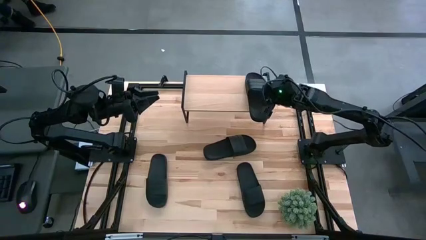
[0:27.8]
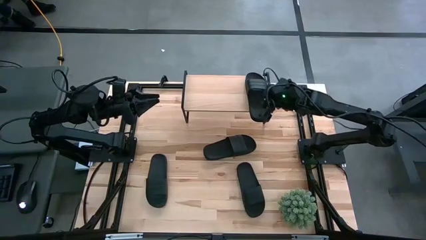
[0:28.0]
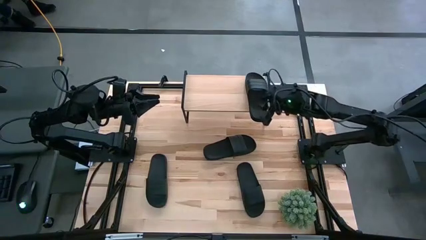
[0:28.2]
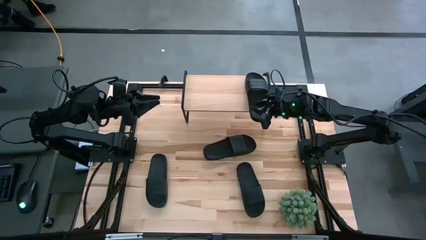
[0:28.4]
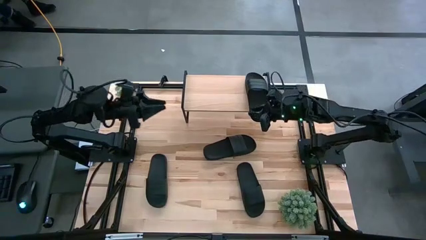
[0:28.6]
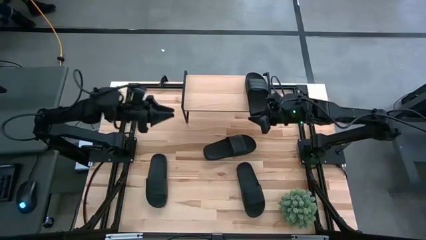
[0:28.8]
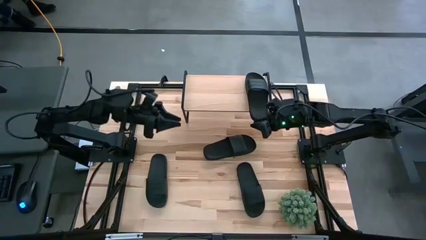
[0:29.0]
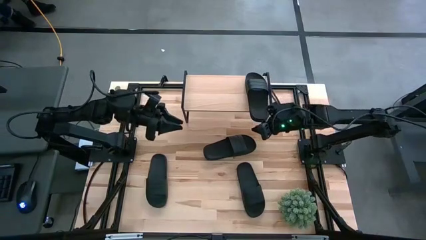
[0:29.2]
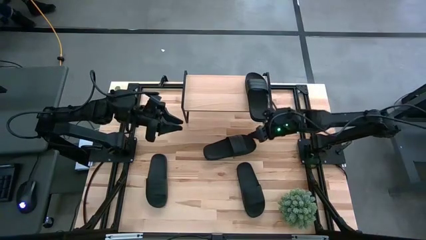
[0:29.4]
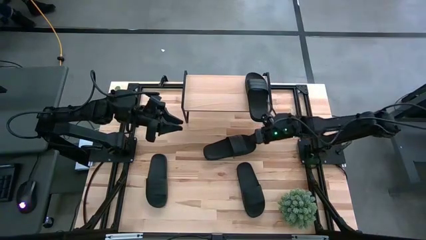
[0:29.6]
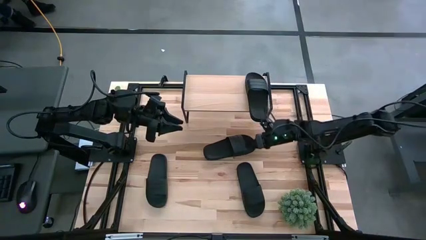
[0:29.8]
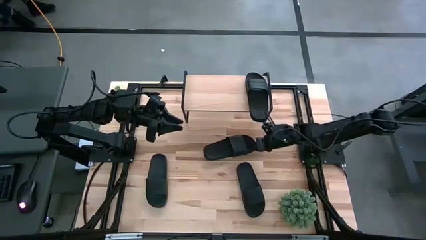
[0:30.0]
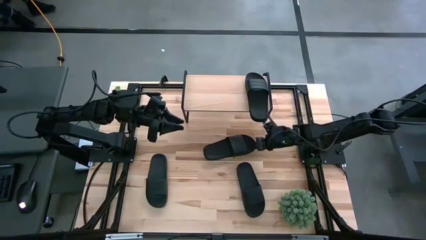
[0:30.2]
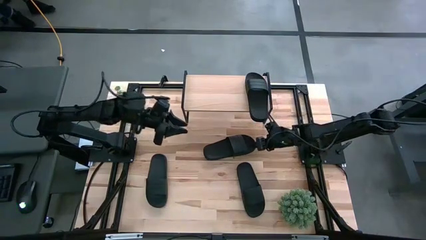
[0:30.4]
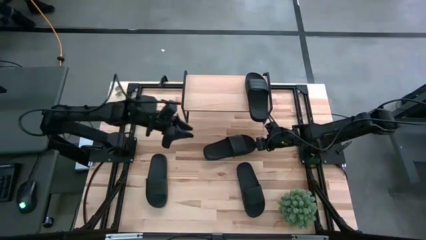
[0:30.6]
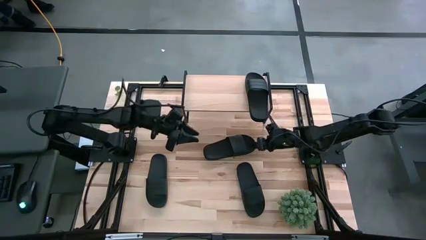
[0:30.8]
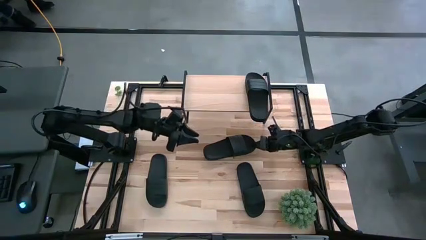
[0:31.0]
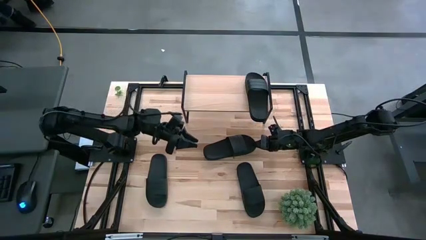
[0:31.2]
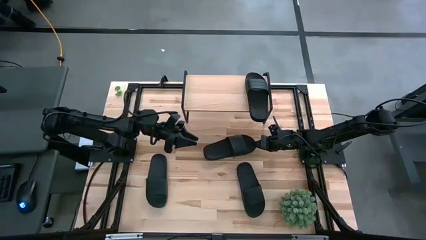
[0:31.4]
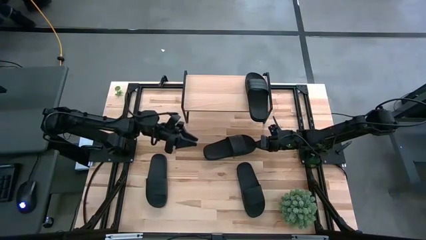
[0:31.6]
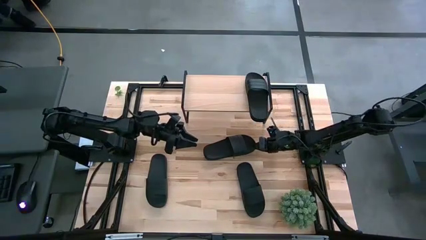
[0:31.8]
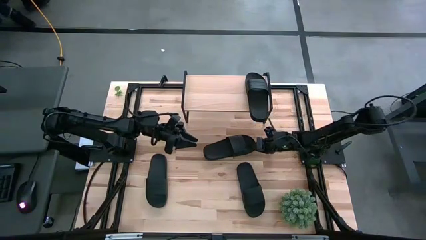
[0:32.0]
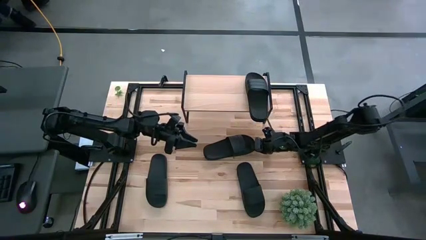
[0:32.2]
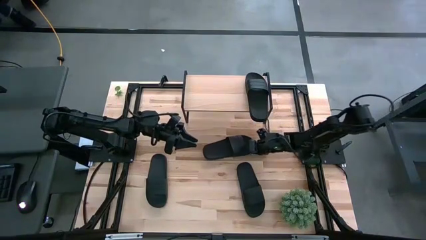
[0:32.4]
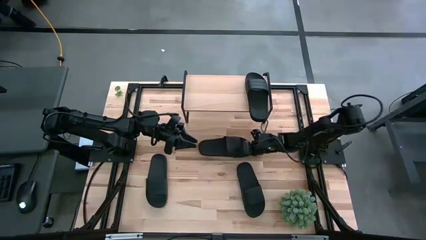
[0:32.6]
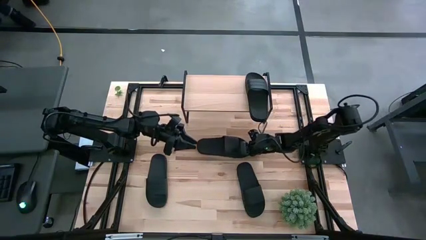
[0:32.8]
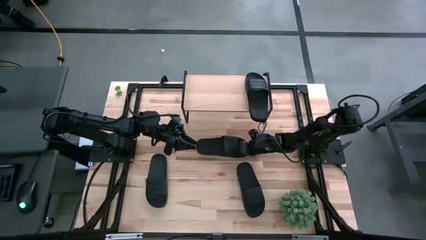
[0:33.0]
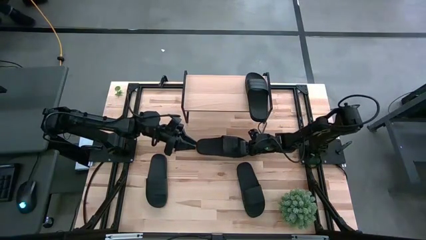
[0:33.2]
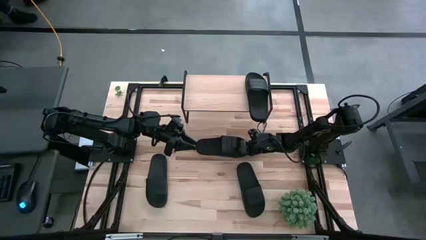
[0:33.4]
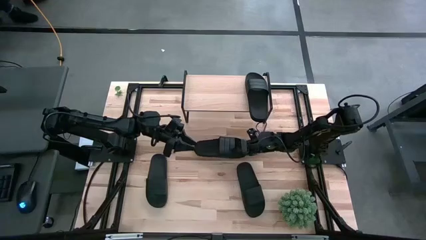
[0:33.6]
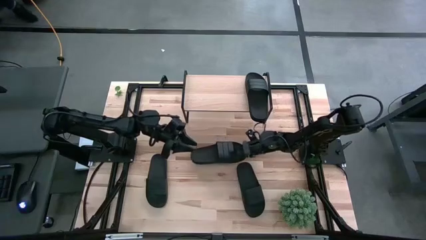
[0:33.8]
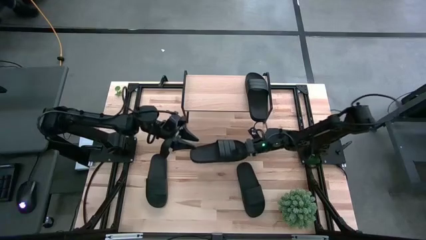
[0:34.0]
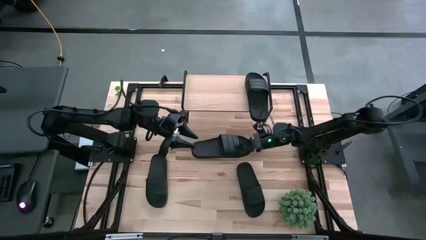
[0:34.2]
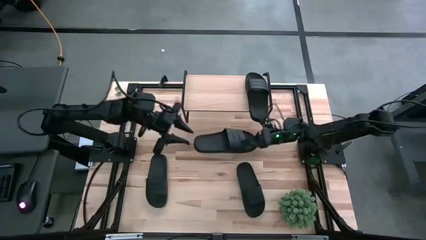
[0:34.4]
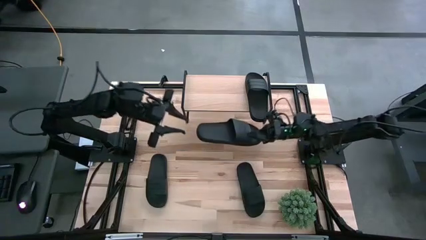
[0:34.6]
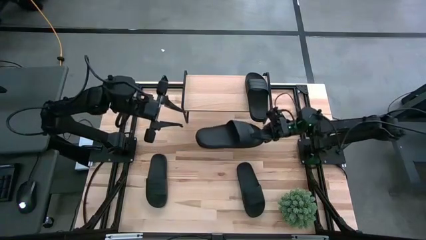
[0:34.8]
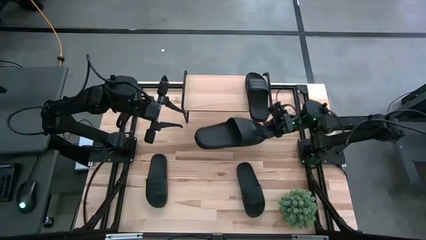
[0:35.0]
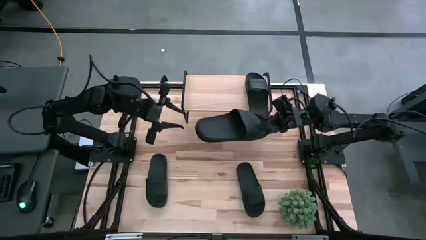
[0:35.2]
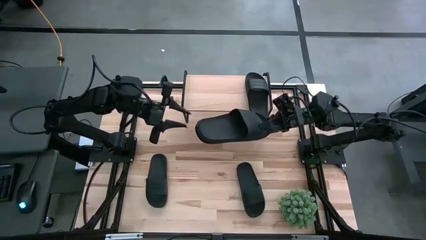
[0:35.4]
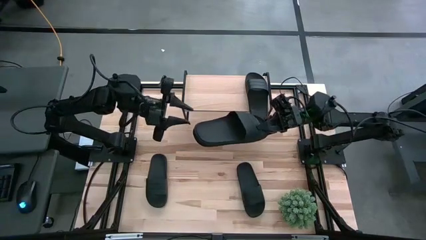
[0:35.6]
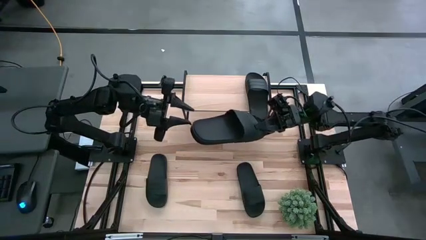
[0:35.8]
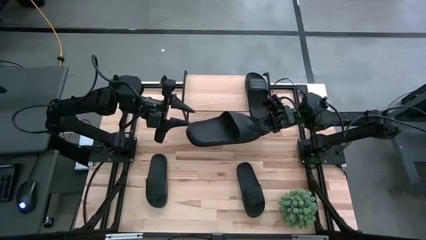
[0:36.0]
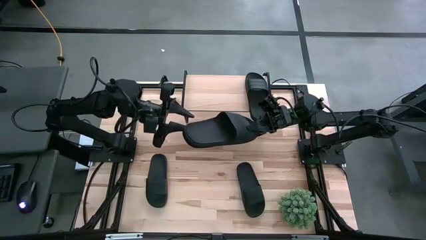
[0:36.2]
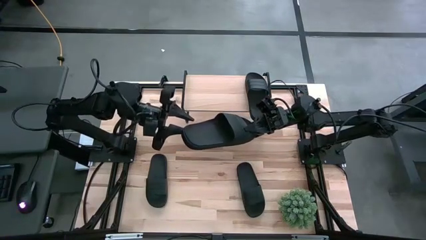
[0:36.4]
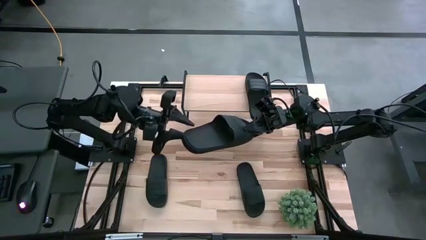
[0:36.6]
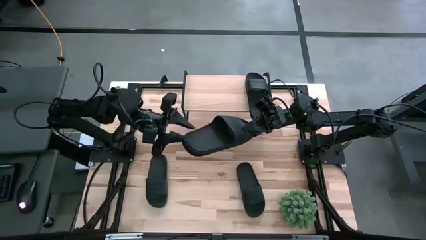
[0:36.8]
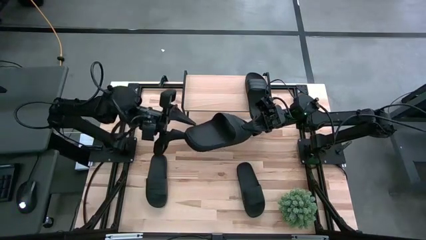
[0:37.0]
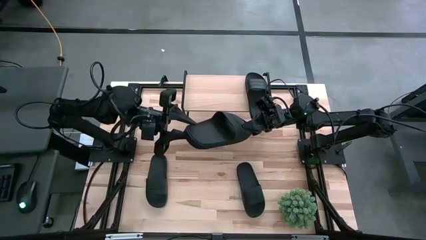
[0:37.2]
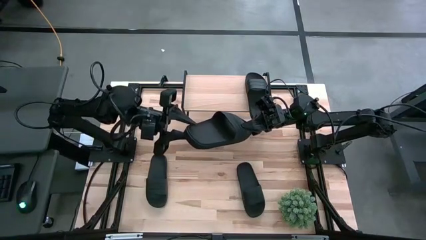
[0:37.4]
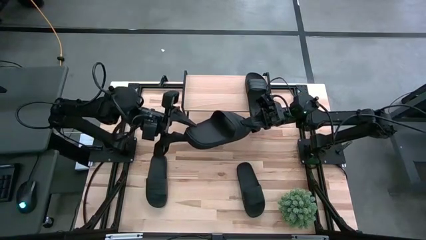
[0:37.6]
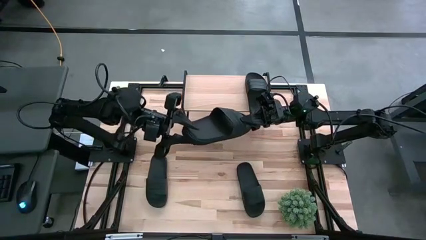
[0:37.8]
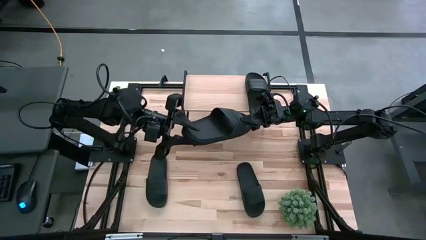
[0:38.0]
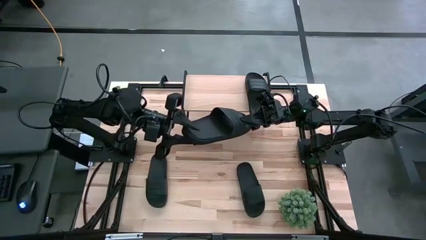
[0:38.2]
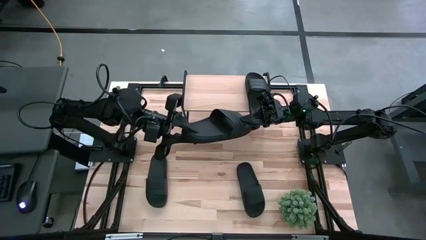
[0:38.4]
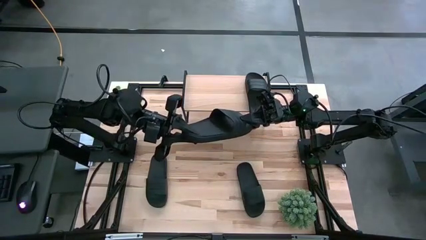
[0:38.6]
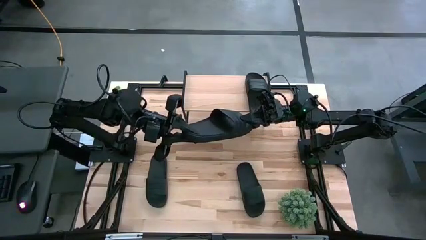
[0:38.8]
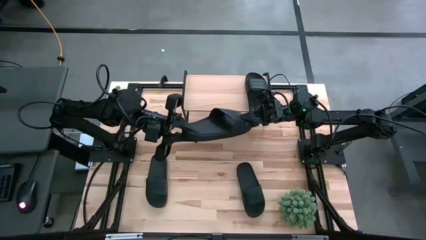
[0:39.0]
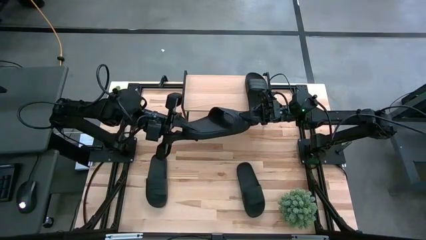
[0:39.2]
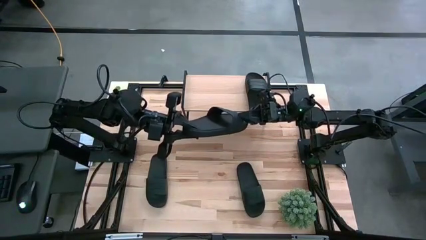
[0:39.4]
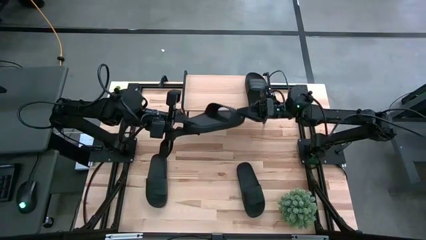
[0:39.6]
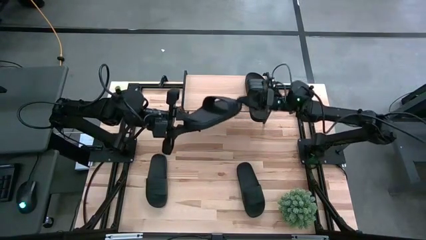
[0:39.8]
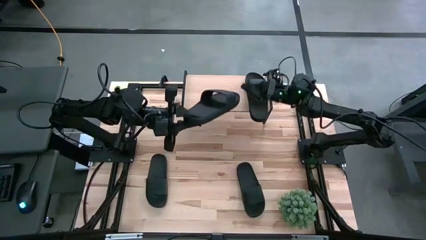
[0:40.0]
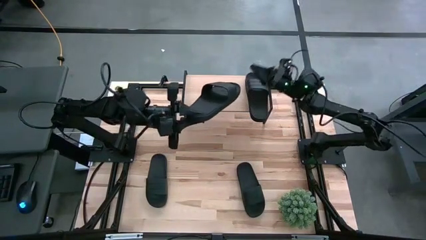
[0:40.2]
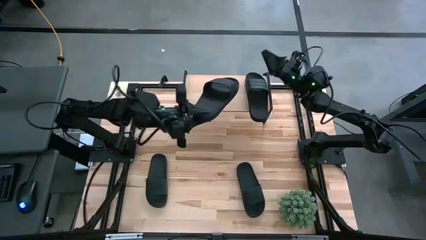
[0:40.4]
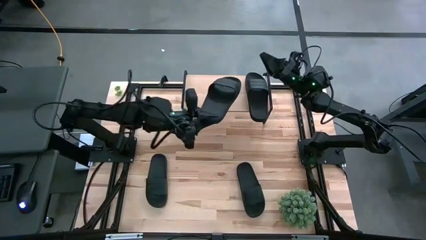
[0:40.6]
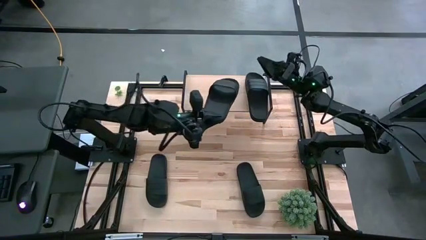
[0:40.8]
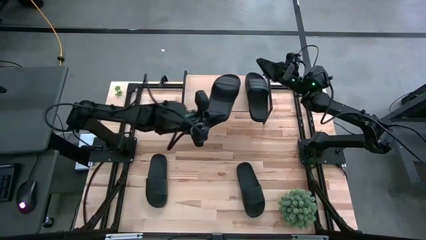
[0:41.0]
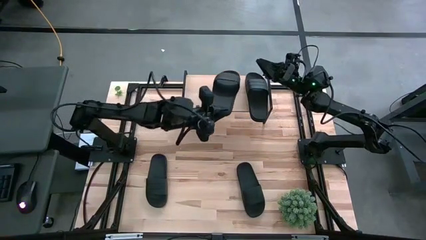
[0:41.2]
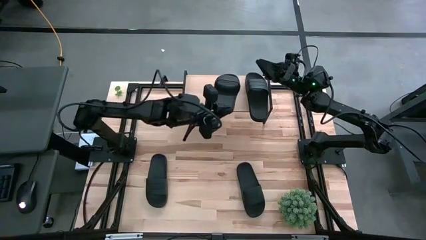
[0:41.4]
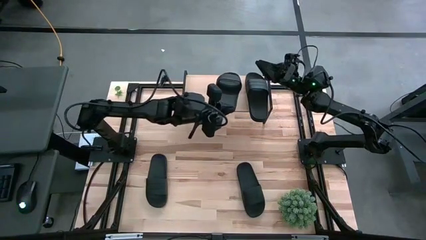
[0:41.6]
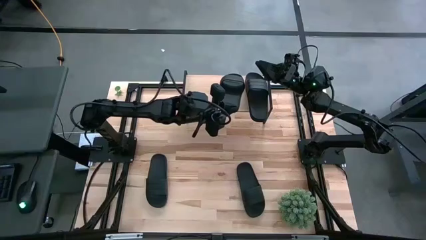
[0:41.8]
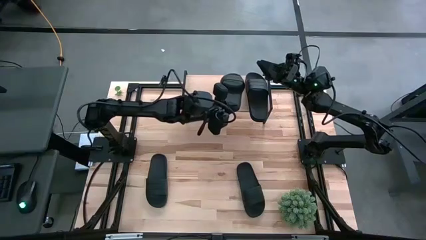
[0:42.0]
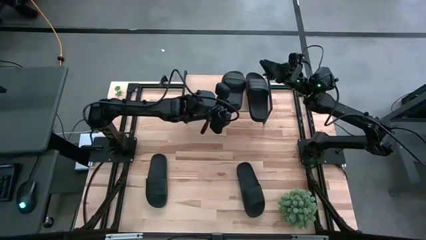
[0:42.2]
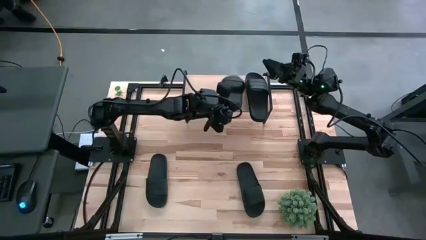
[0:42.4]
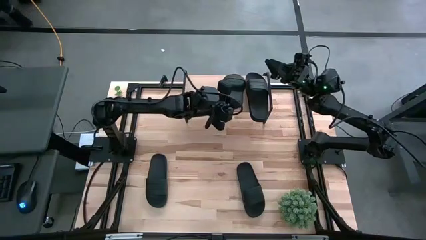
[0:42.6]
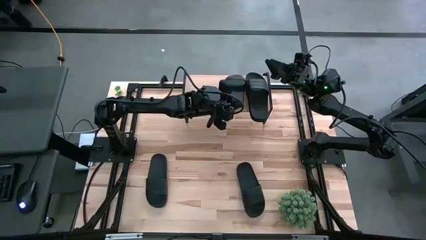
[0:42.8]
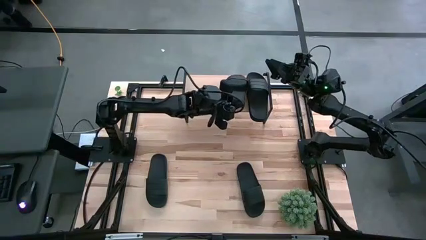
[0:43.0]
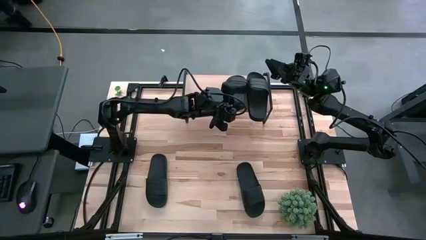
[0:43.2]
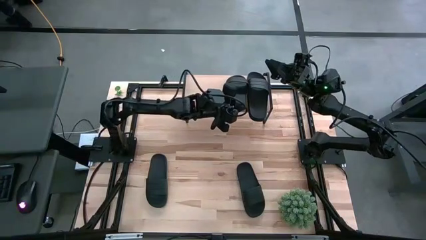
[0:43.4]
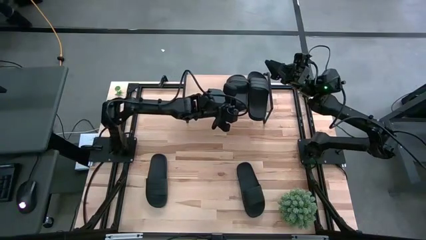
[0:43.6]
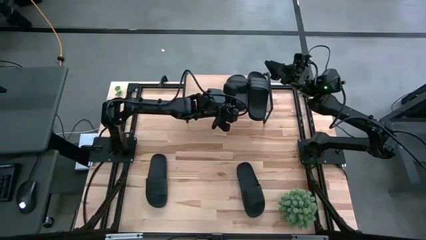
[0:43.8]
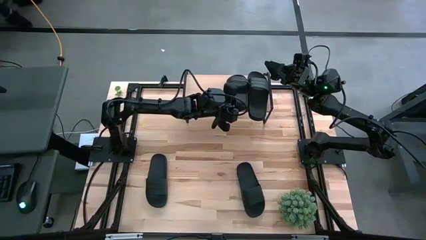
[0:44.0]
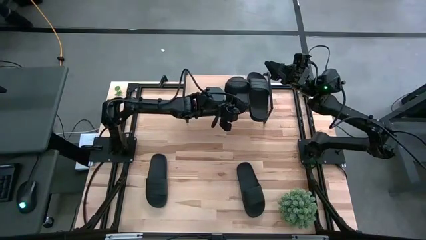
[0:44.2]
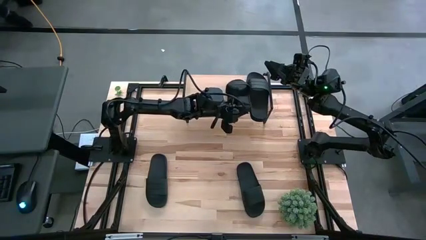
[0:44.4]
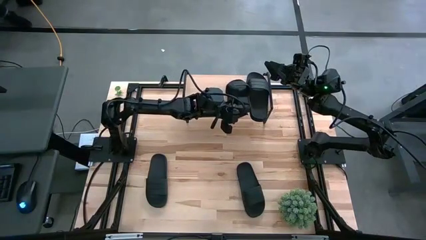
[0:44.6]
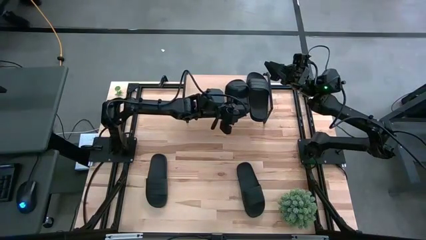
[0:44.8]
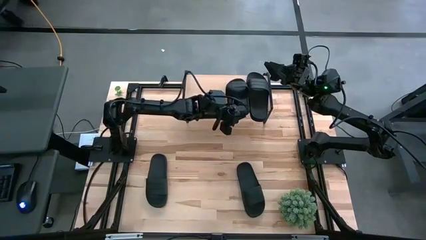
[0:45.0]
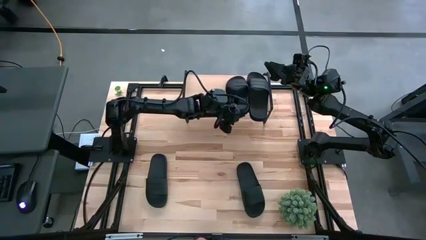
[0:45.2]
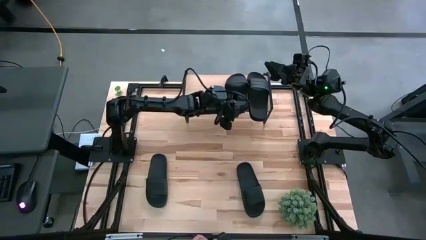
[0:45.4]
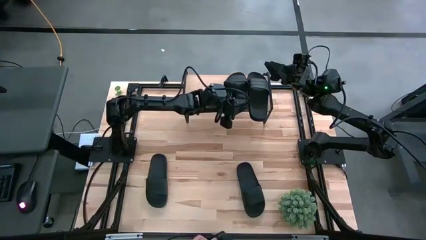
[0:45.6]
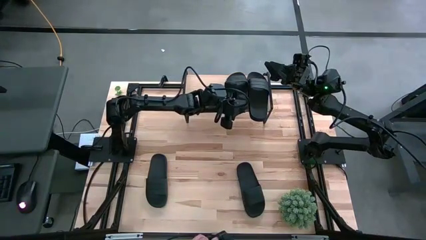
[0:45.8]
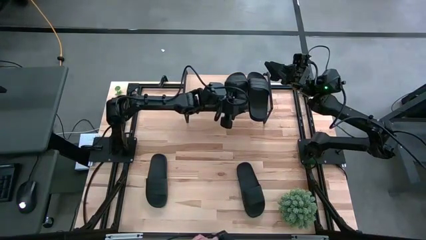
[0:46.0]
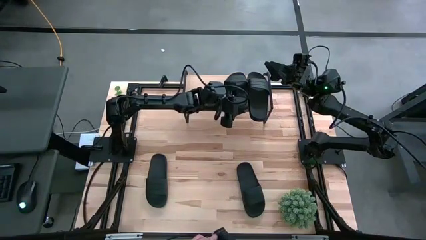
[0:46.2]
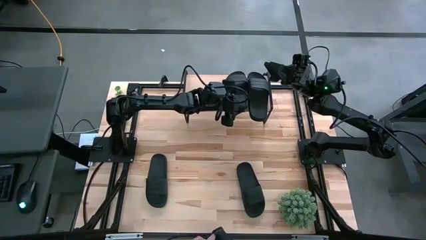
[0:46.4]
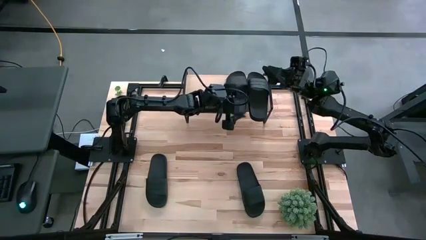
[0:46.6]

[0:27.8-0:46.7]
Task: Pick and place slides into the shelf
Put the black slide on the shelf
